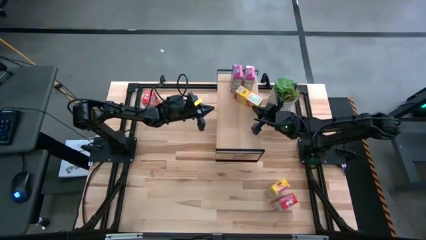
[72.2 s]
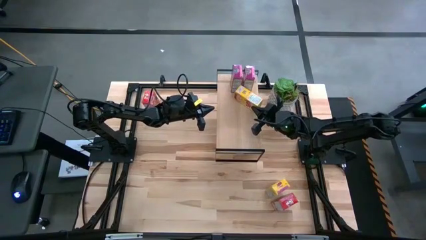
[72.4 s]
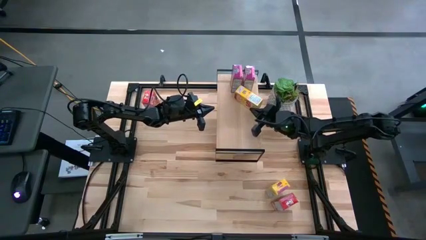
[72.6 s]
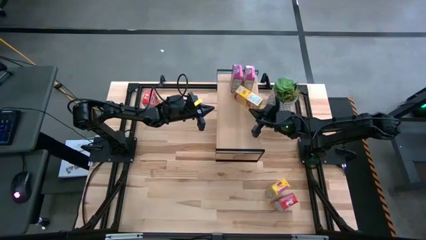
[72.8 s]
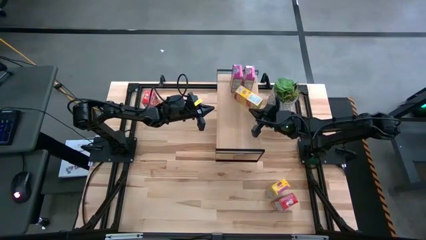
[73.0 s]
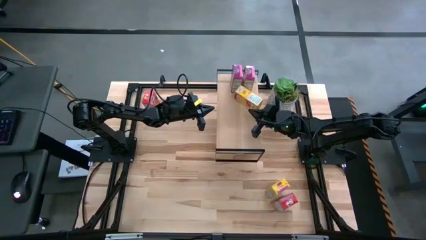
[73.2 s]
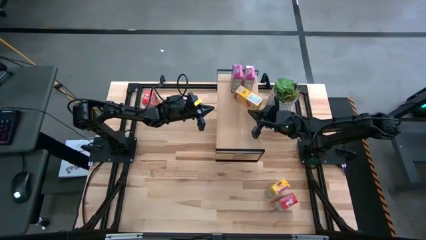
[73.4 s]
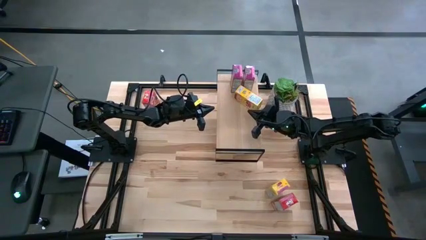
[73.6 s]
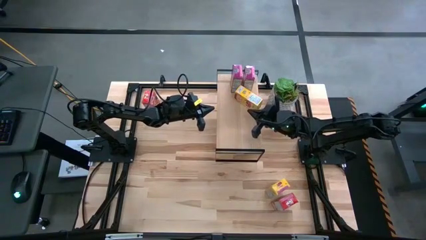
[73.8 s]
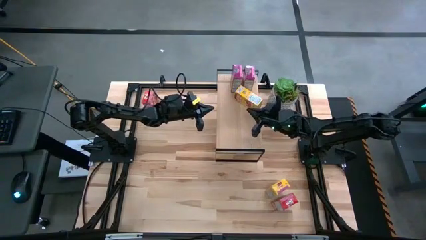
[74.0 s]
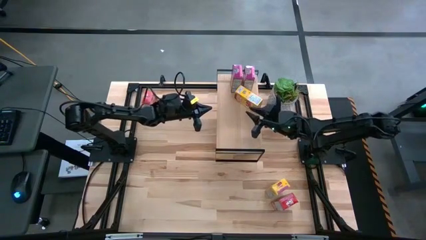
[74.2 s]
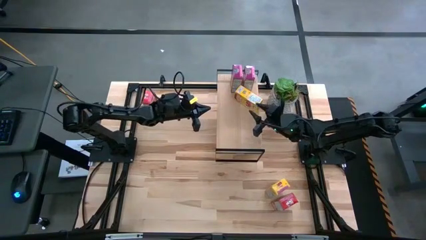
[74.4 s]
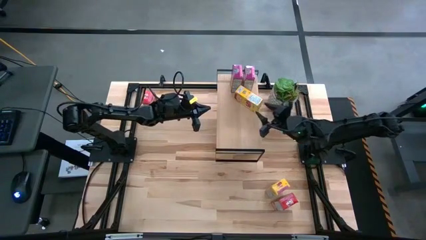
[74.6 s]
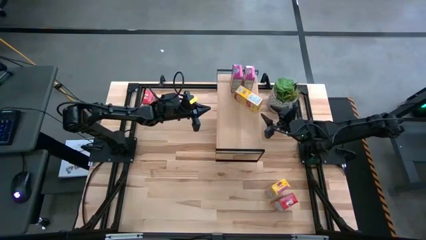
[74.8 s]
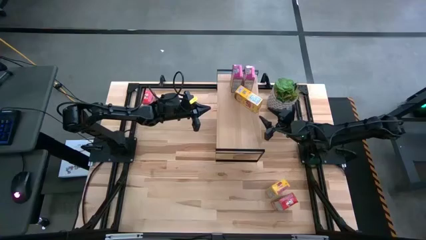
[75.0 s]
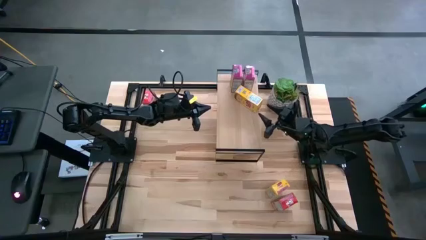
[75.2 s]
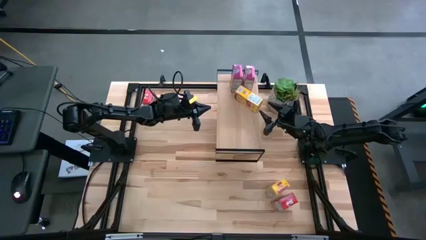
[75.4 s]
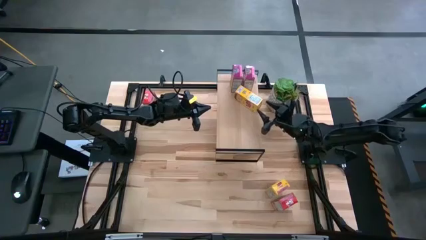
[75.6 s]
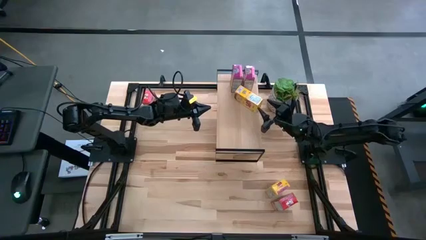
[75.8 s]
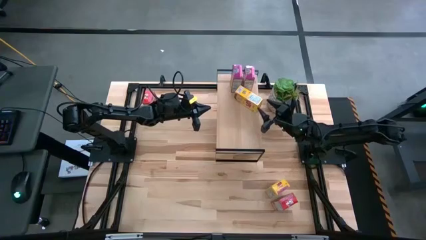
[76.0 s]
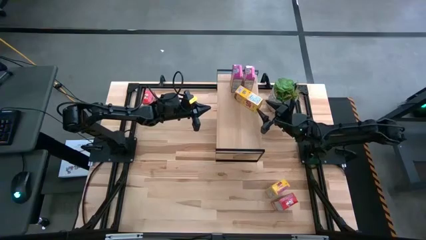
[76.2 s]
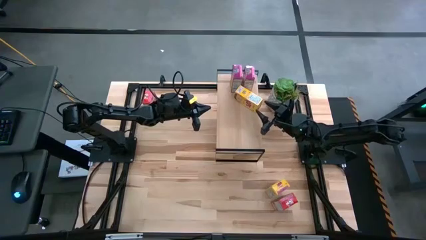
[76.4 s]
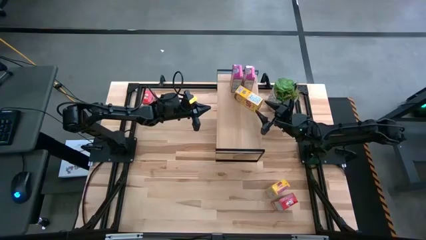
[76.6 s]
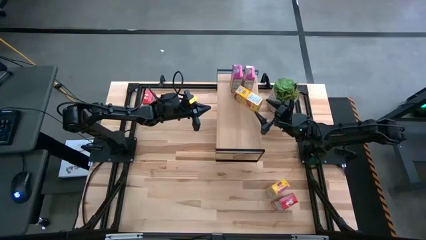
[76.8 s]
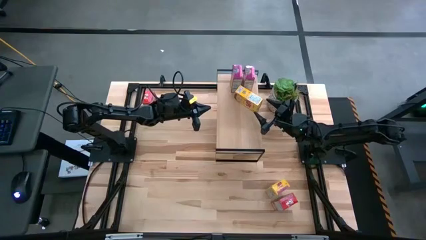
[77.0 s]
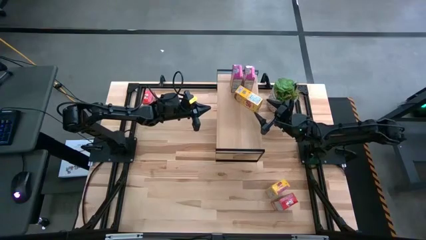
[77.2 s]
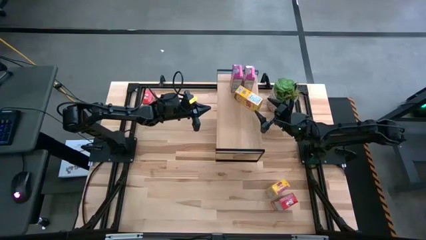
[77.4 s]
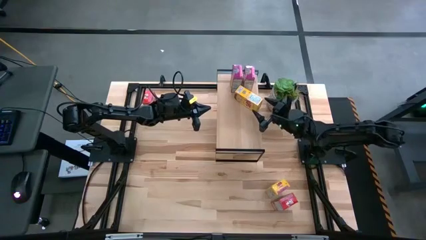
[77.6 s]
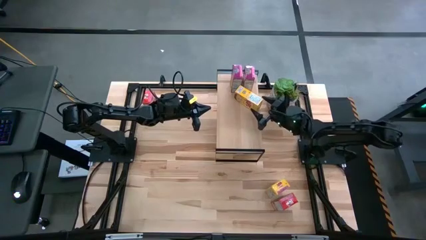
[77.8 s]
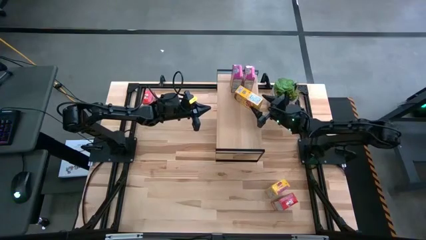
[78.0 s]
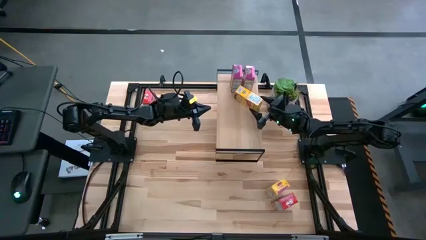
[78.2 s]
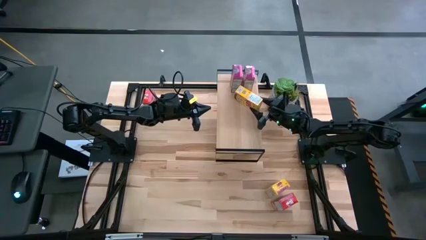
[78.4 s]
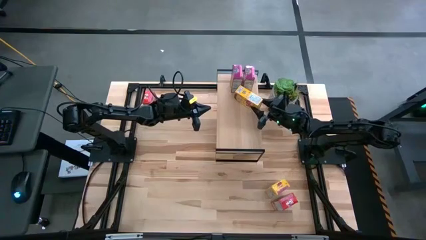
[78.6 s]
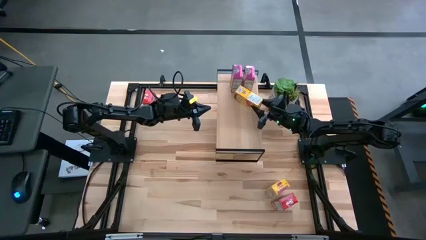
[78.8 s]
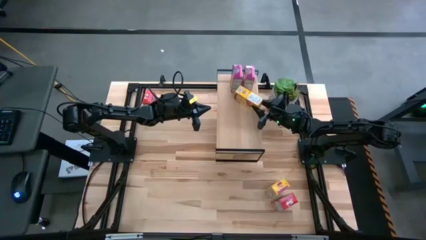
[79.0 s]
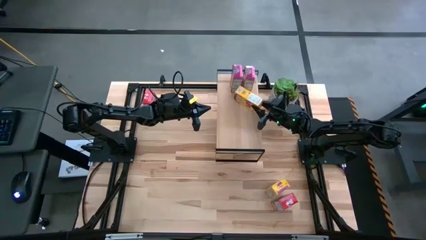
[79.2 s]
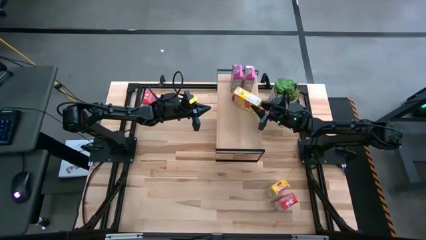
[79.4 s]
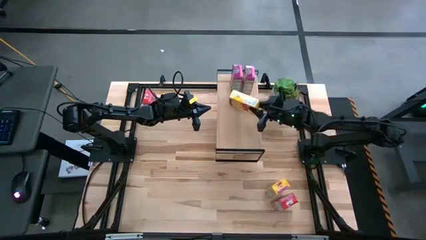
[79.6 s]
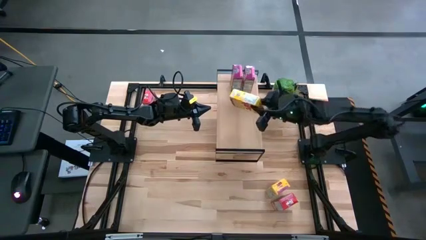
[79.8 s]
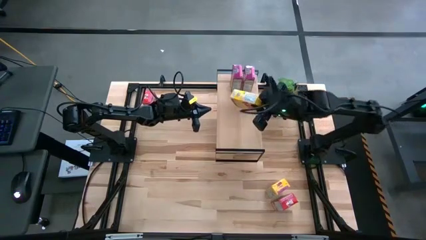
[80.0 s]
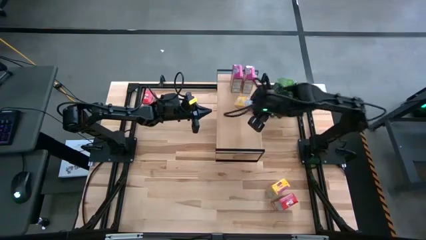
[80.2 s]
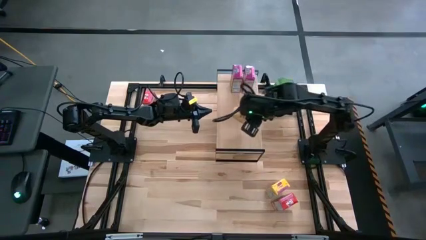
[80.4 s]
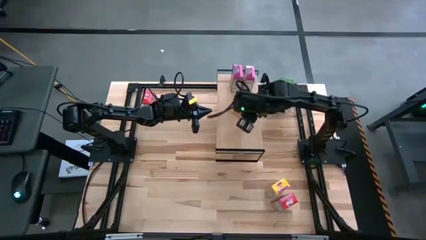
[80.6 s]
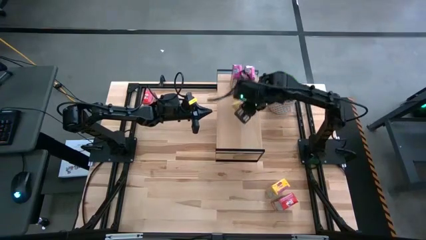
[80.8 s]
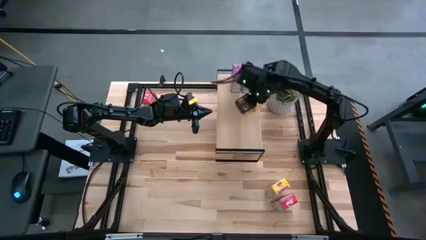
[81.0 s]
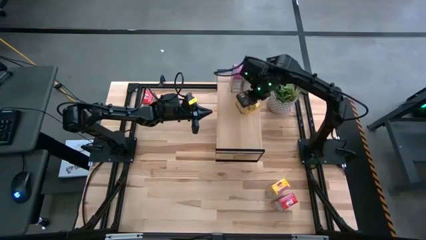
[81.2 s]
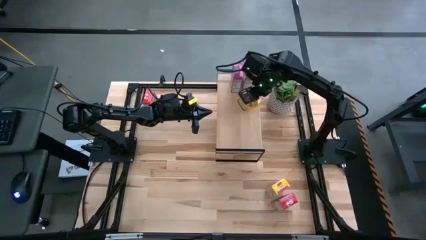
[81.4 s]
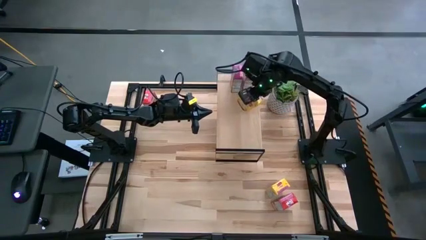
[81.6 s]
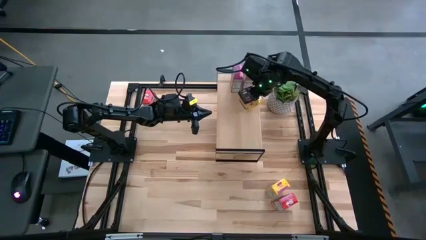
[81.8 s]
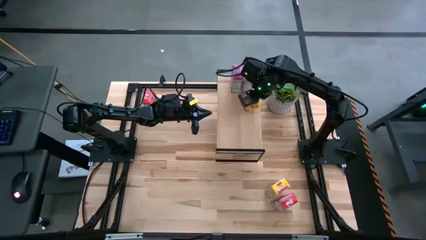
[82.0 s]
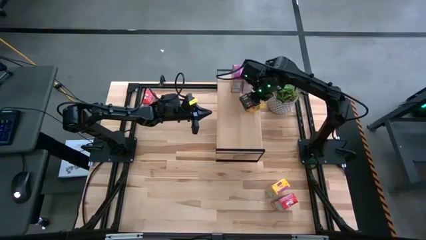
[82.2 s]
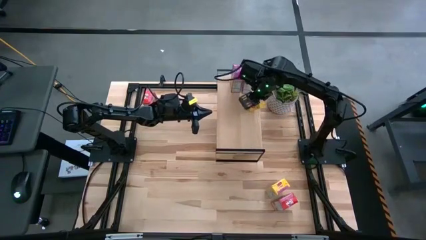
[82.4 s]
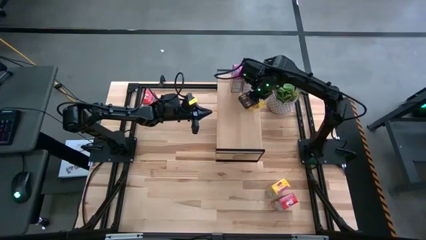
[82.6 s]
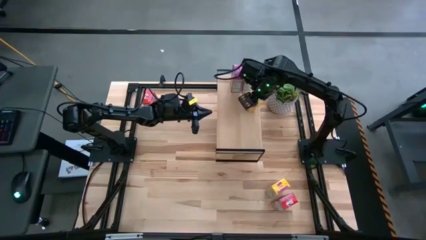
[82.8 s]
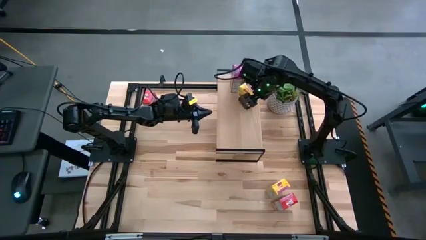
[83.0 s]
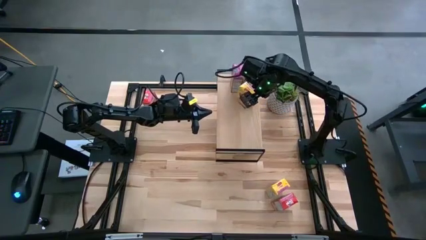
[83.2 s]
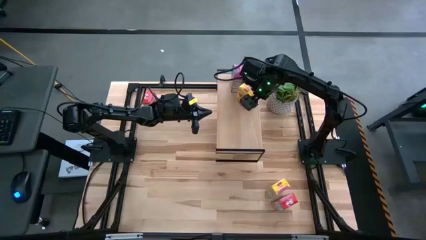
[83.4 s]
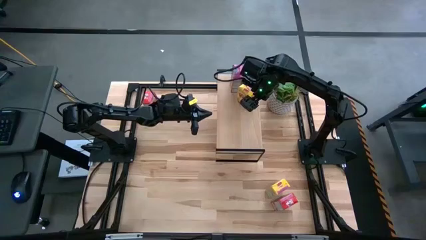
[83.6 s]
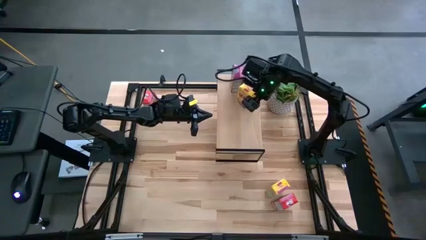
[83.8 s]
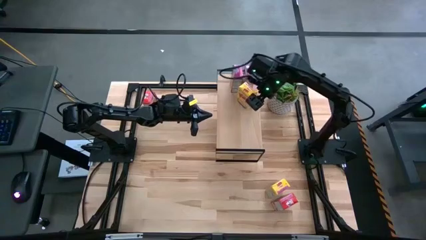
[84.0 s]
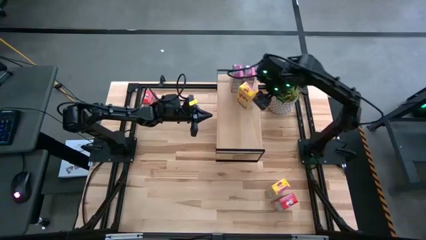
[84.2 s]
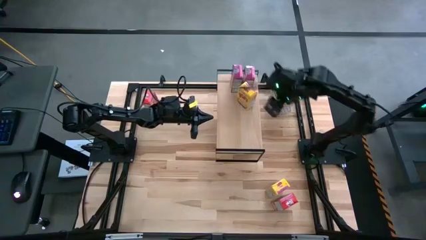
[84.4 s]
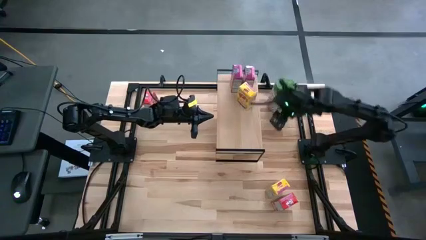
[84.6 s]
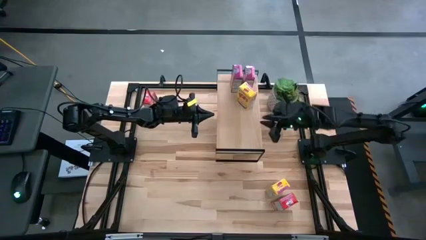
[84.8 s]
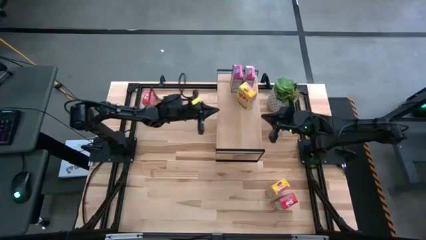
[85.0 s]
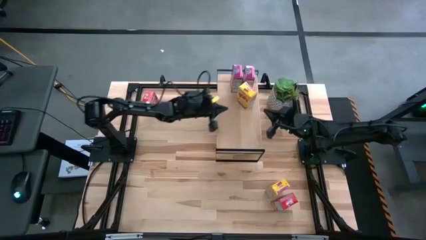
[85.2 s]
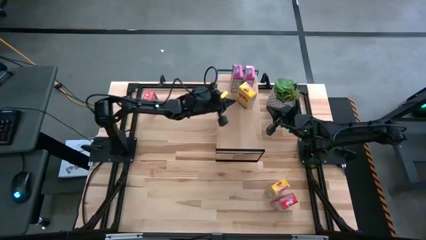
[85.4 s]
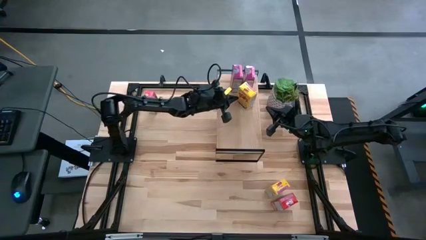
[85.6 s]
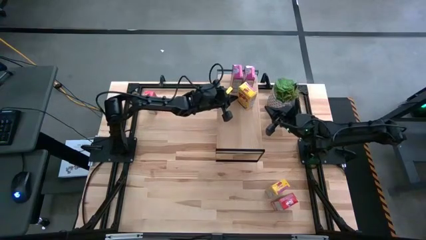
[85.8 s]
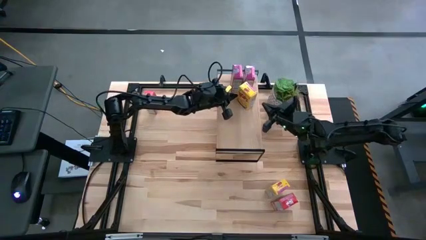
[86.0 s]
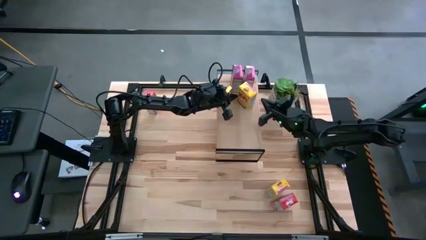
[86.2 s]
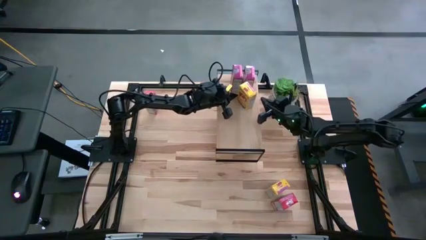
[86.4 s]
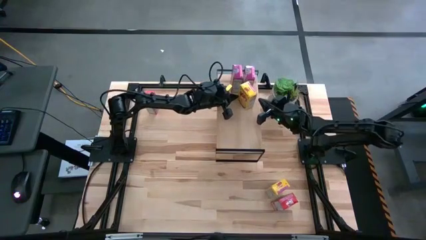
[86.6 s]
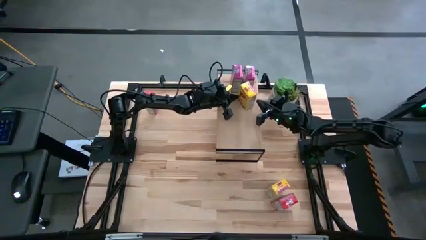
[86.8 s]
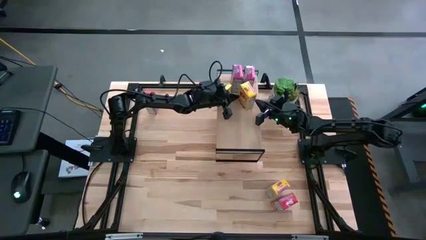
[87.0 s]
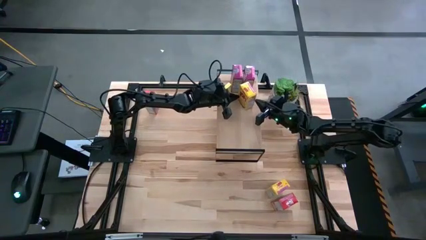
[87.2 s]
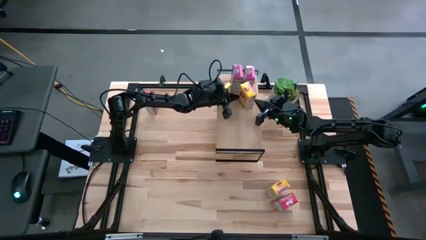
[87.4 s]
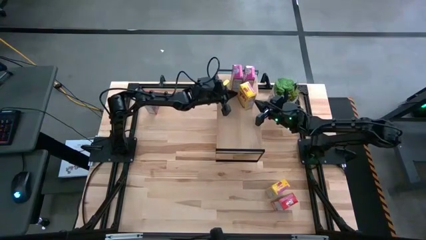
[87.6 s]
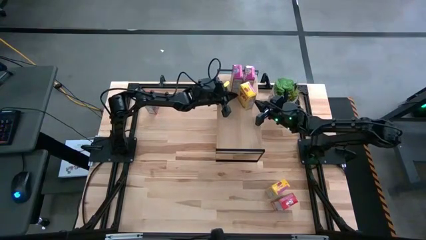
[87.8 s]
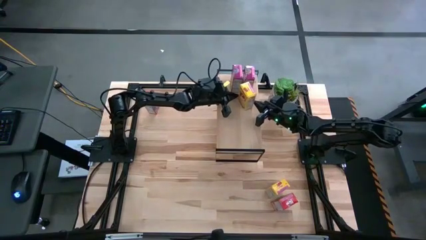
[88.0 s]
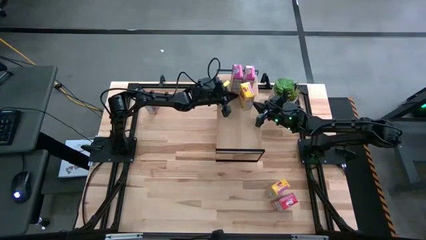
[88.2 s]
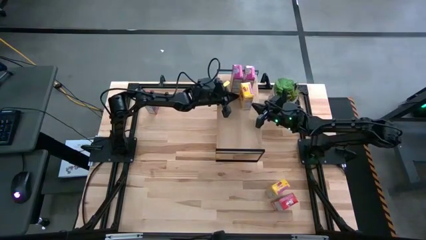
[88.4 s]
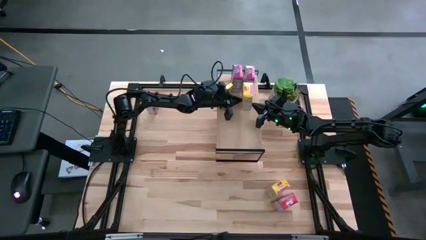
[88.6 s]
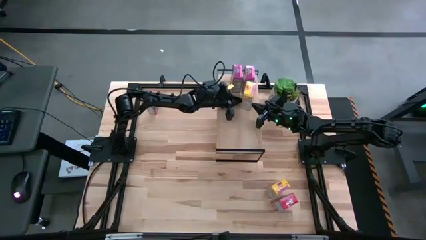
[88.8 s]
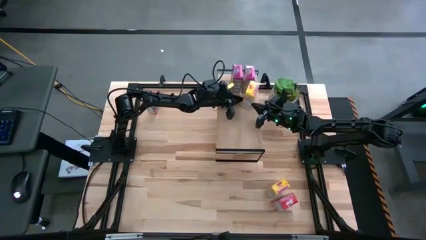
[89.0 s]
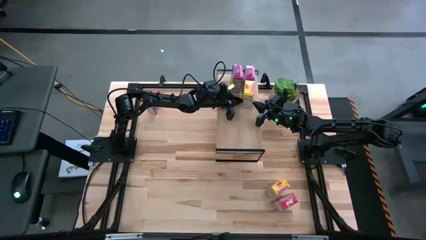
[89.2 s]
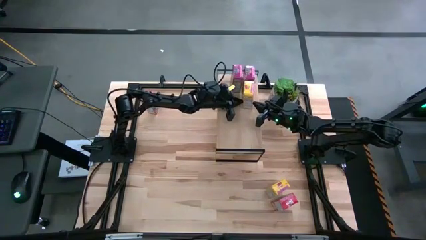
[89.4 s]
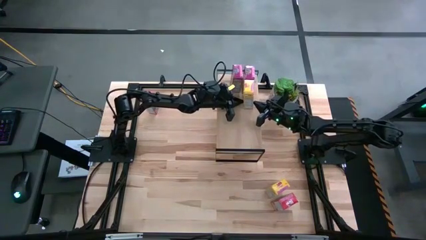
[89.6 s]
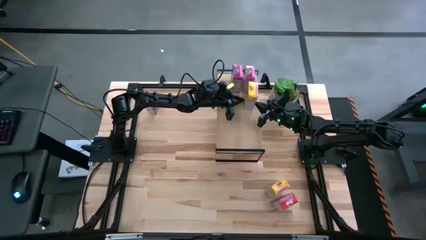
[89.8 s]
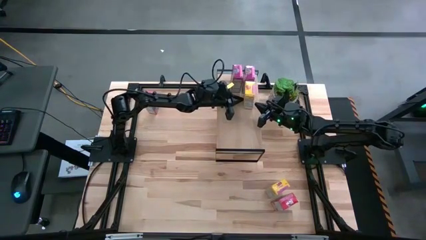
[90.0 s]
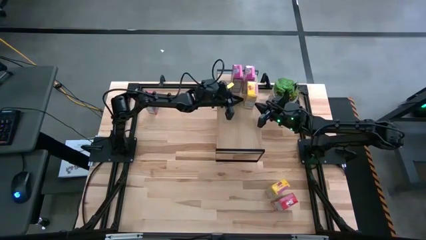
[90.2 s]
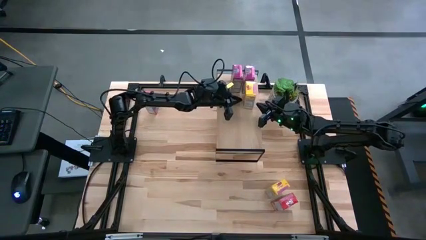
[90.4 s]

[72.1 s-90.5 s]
Task: Stack cereal on shelf
Put the top yellow cereal box on the shelf
